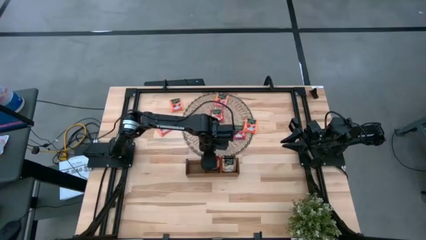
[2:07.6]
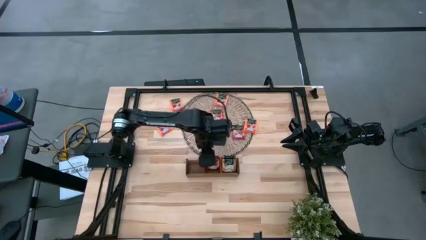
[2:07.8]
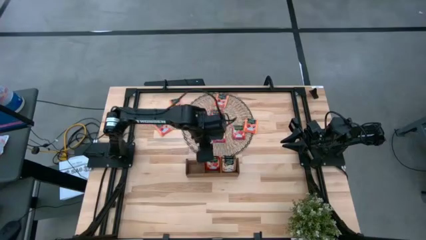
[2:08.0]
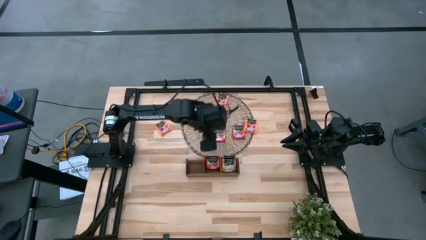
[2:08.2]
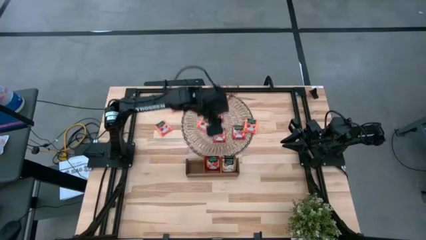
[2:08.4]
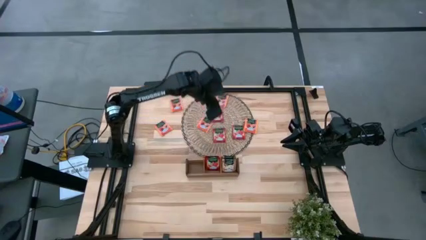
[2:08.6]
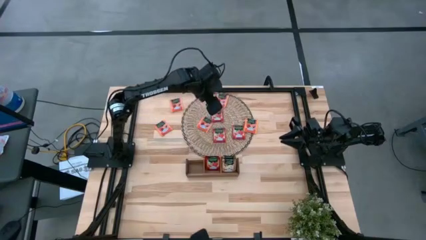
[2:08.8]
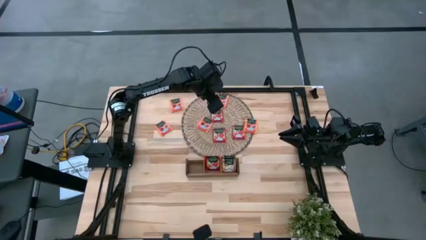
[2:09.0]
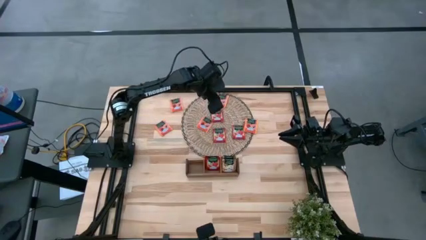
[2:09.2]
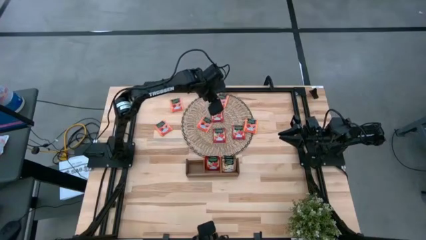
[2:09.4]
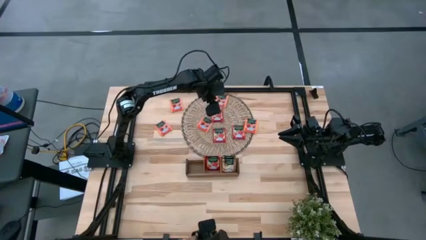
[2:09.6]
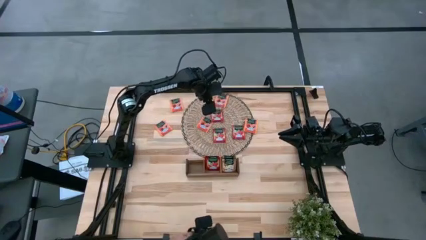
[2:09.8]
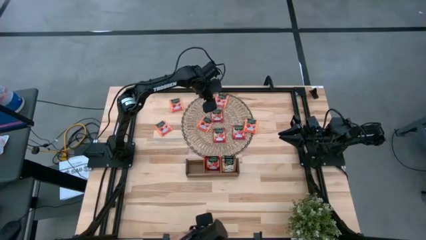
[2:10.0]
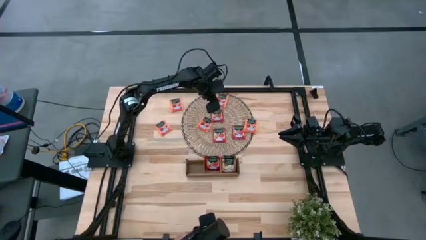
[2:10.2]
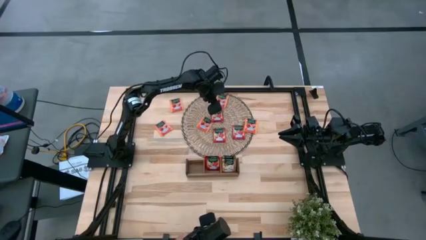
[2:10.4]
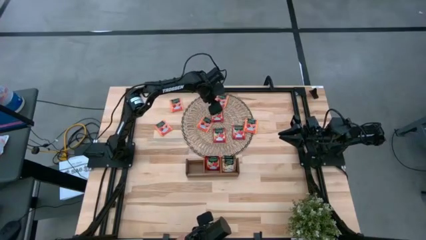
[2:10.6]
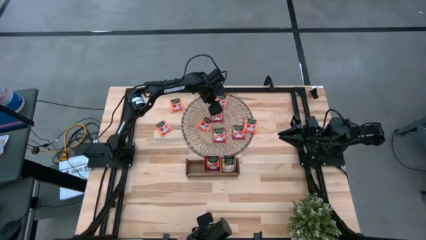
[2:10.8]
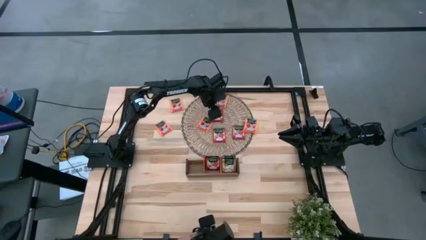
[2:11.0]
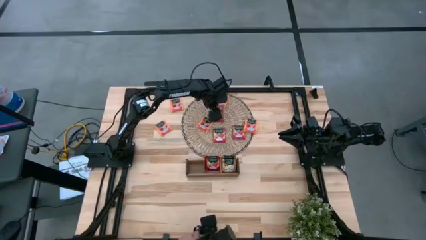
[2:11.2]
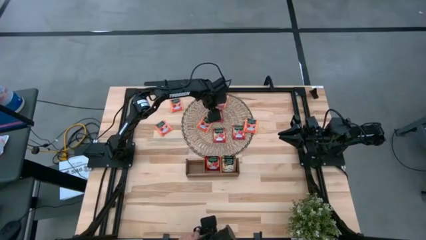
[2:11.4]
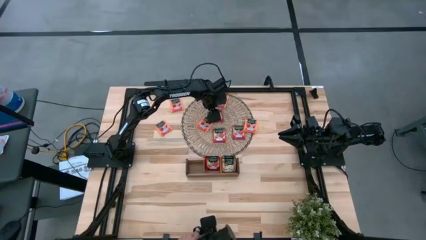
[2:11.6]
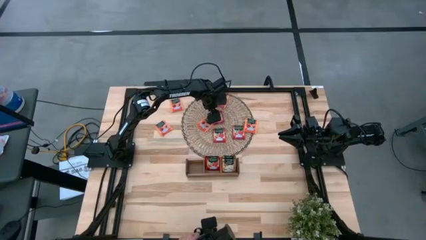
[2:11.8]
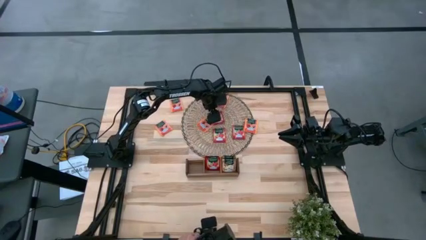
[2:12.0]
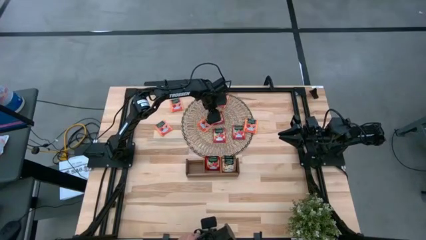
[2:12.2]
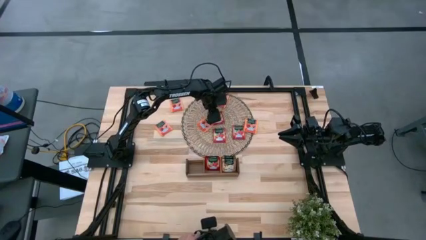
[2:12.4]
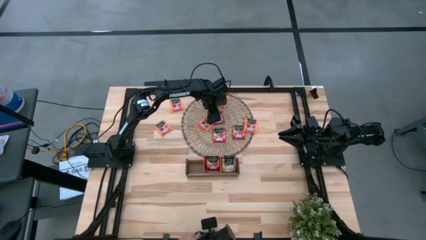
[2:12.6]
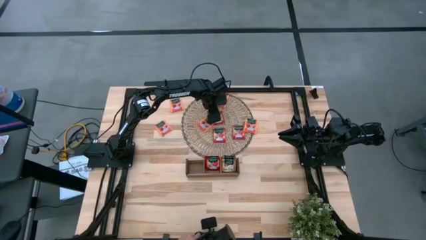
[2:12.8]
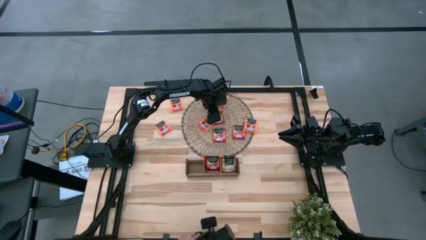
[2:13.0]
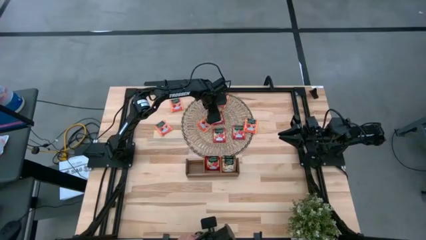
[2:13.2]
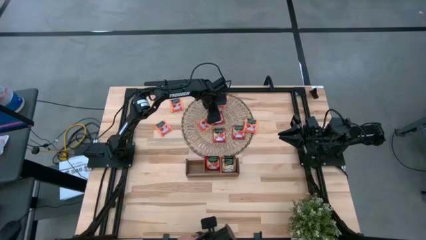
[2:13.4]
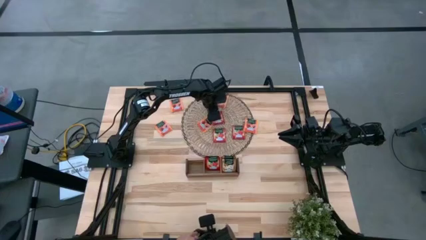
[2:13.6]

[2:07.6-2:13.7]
Task: Pick & Place Tea
Put the red tea bag into the middle section of the wooden organizer

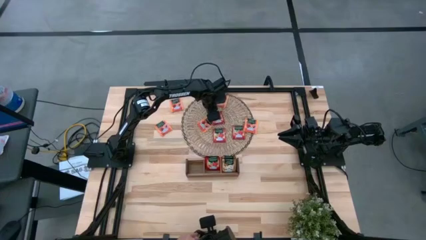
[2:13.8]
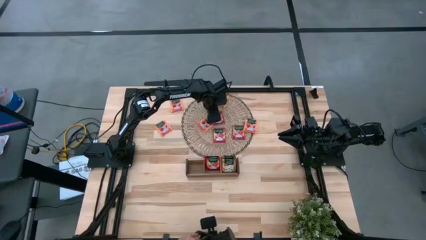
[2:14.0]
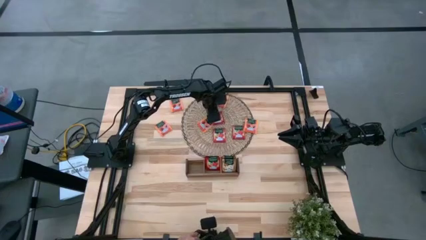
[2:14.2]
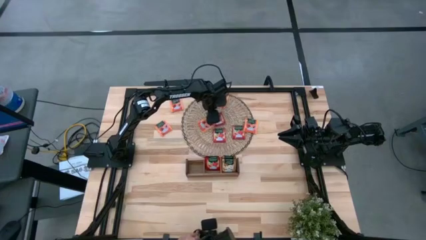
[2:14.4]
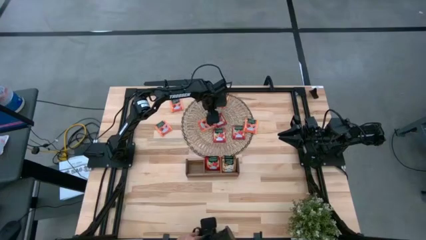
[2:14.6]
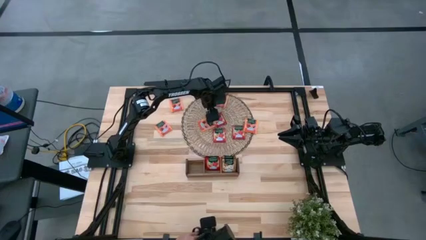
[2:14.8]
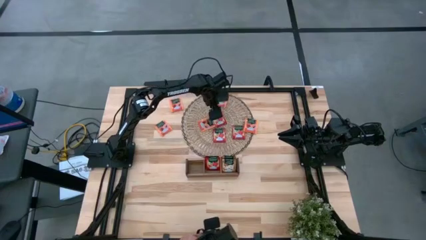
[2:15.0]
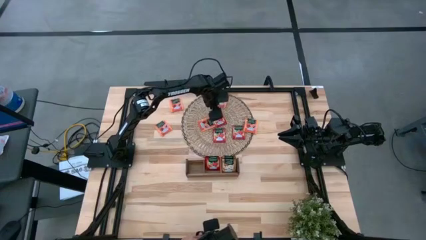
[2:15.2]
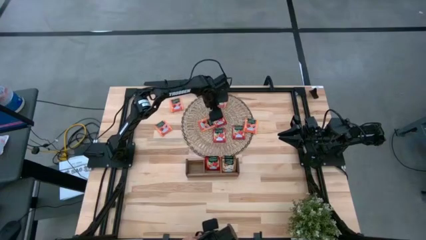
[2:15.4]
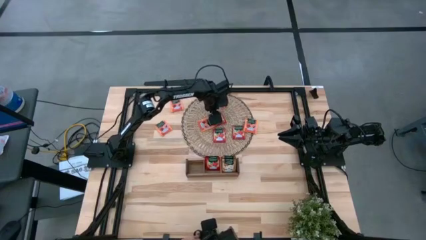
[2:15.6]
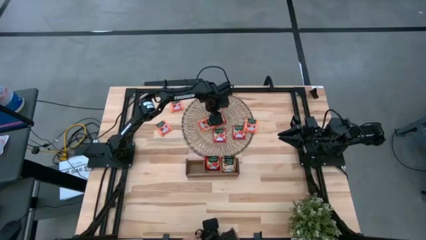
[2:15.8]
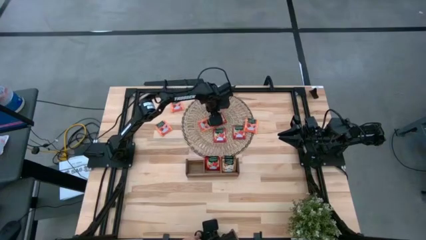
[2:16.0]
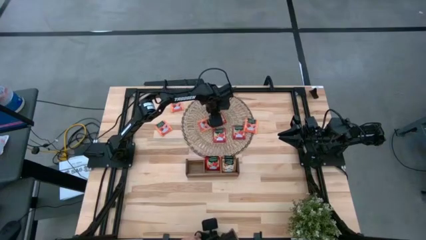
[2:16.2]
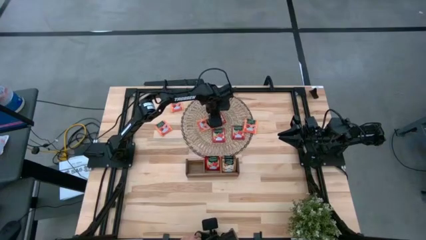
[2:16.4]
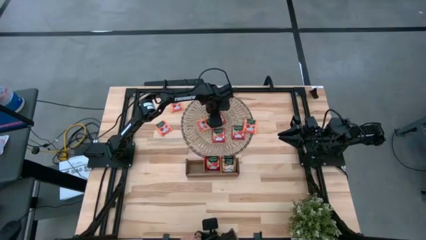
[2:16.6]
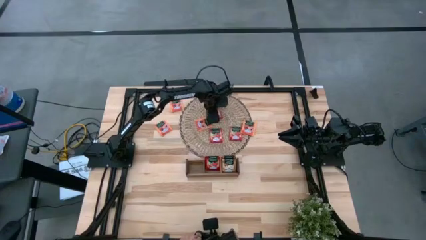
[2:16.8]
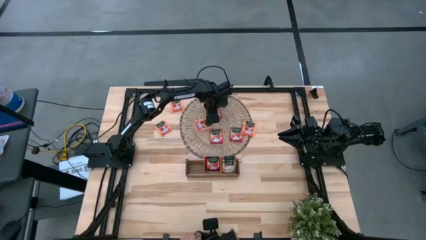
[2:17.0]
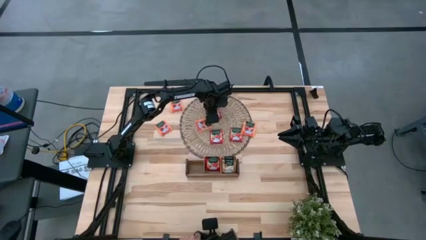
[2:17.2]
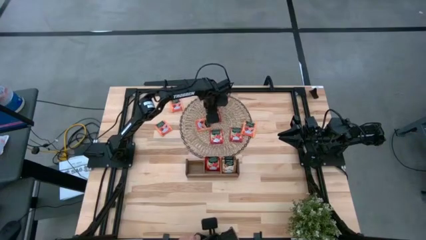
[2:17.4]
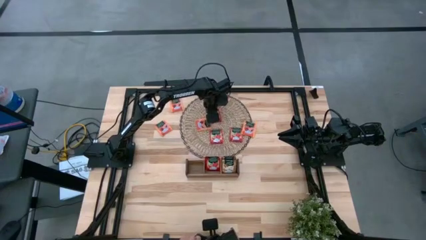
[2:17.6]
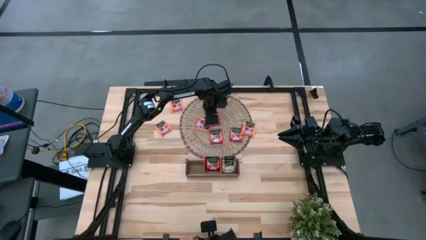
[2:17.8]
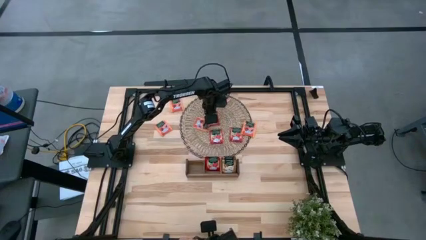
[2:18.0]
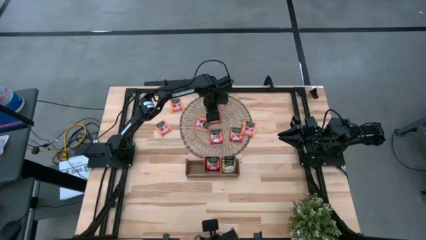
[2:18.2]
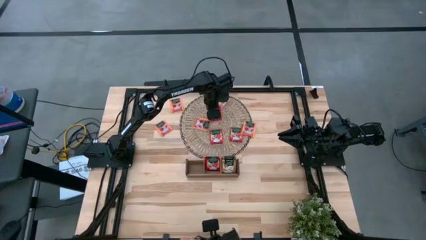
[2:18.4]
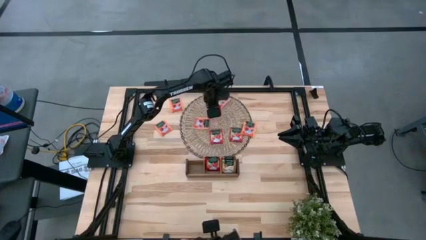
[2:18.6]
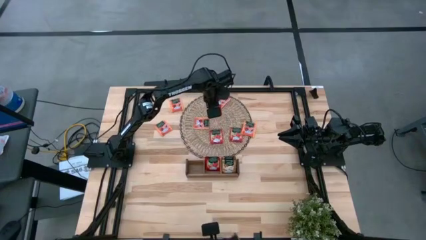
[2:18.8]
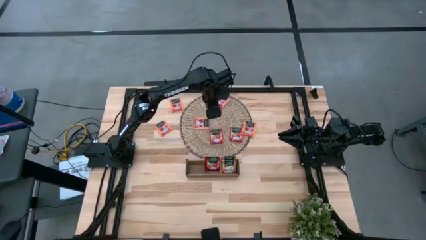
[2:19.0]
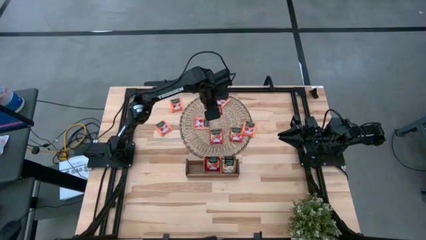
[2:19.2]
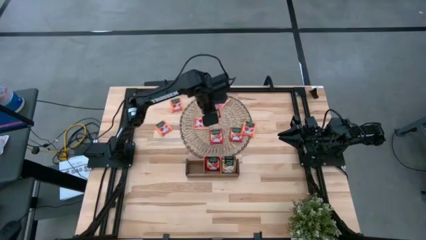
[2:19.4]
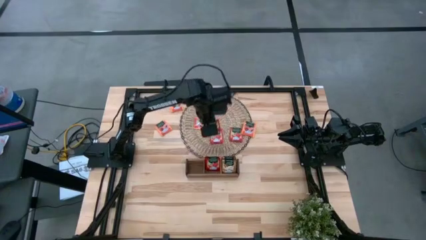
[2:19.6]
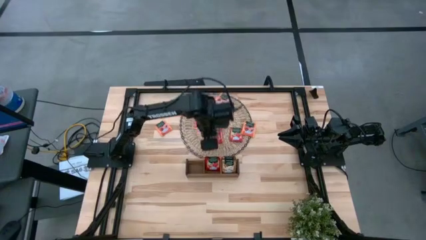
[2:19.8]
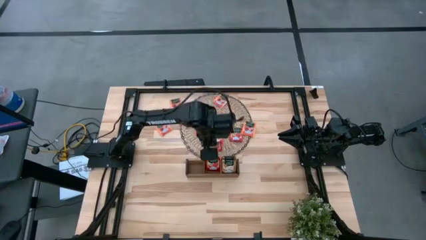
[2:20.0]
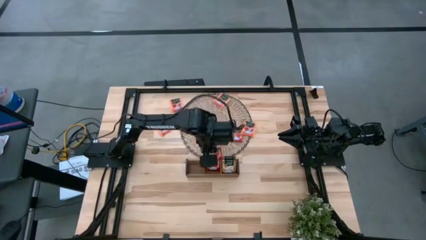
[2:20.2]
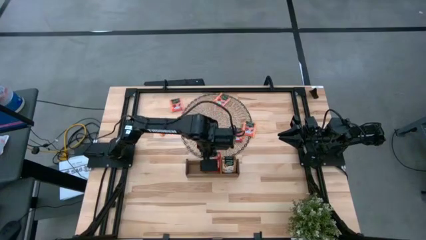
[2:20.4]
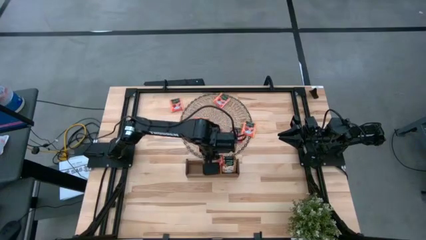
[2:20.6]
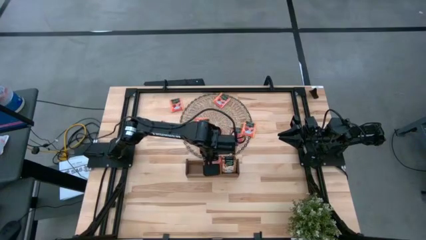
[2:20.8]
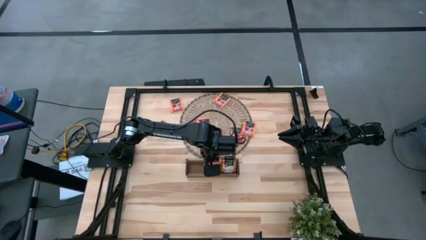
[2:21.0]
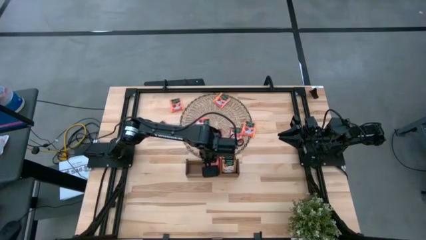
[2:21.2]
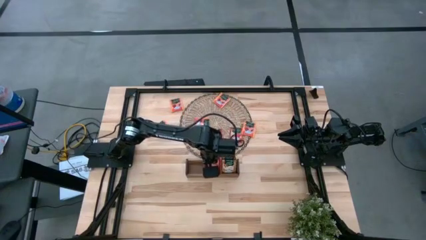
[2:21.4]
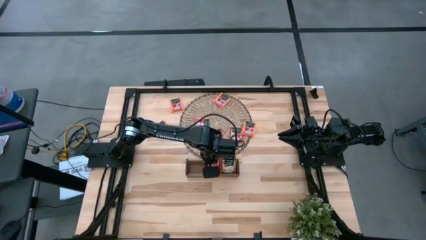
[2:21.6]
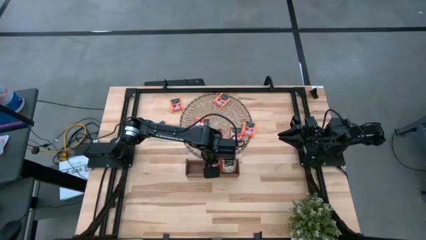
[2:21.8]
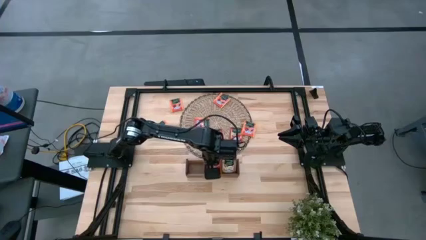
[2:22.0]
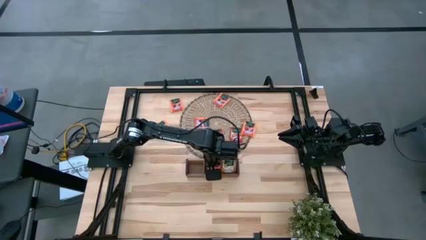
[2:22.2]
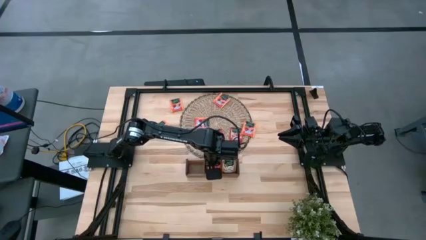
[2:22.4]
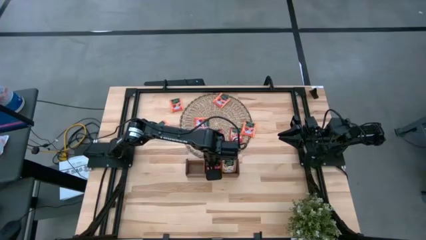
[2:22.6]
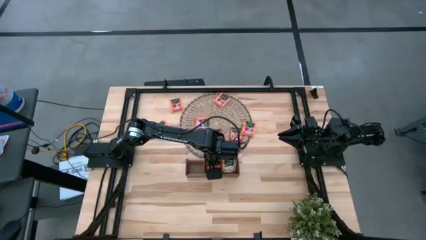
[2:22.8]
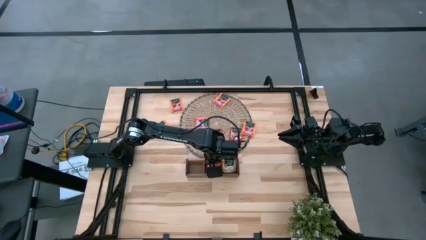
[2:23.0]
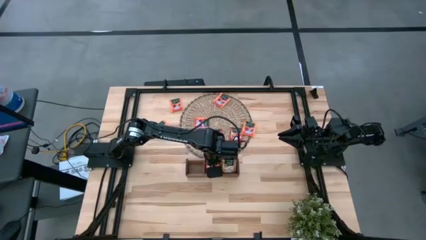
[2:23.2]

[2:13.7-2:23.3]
Put the red tea bag into the middle section of the wooden organizer
